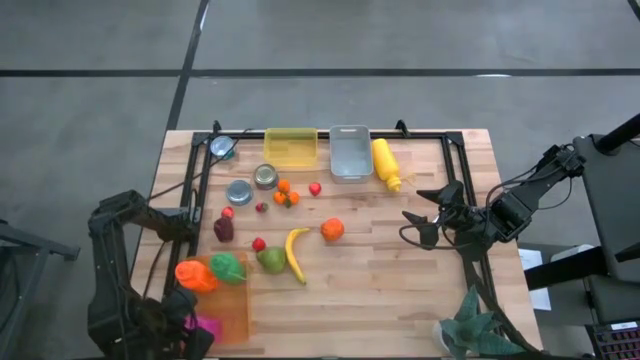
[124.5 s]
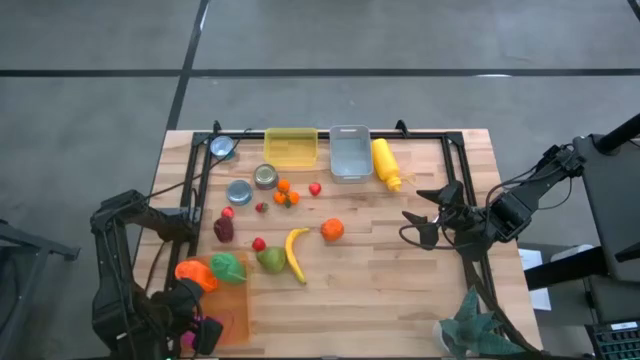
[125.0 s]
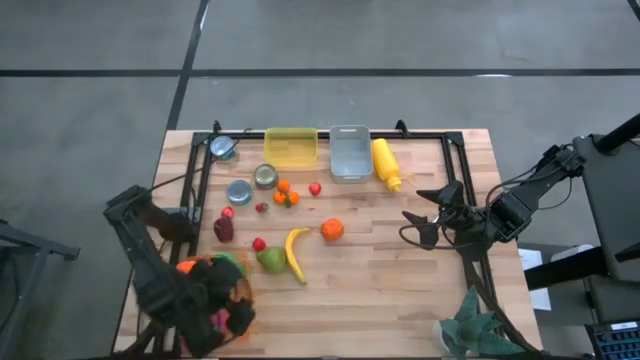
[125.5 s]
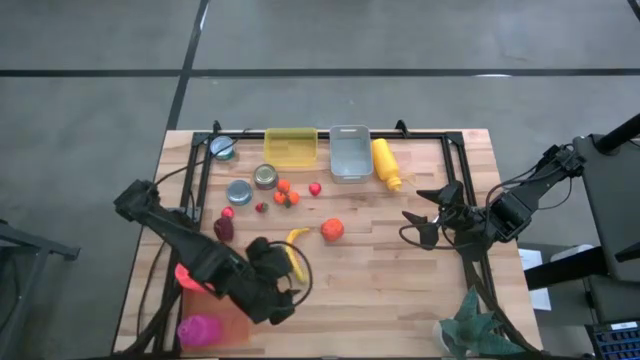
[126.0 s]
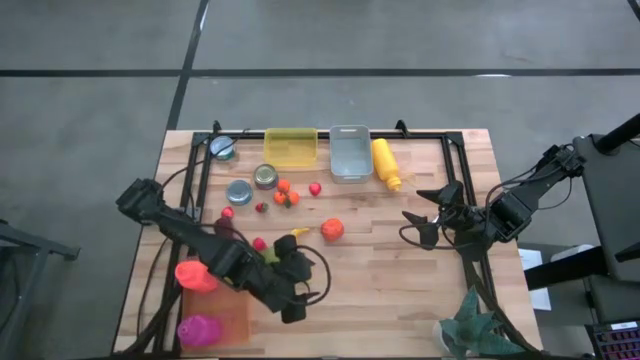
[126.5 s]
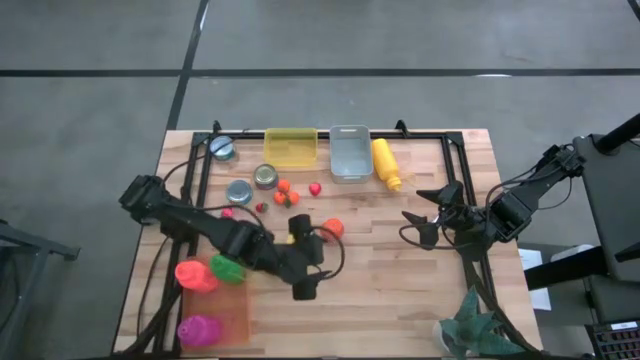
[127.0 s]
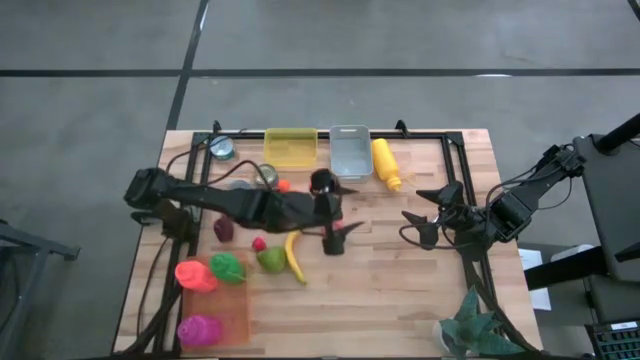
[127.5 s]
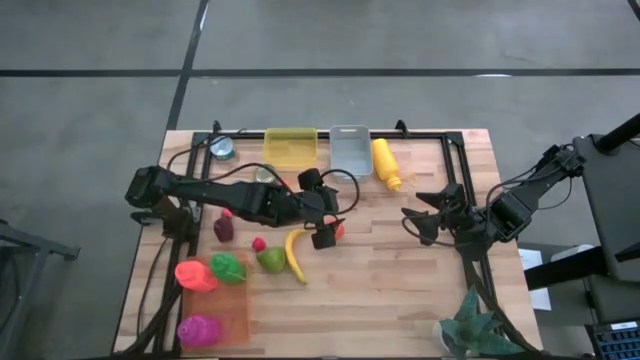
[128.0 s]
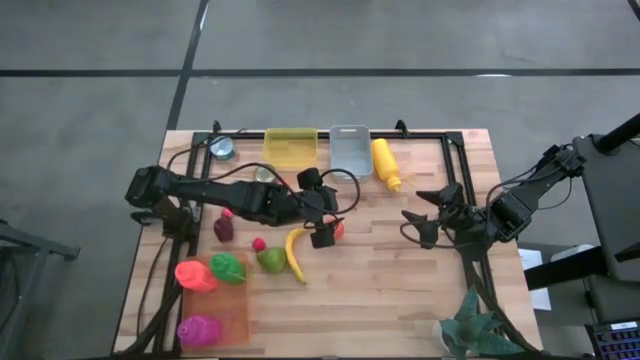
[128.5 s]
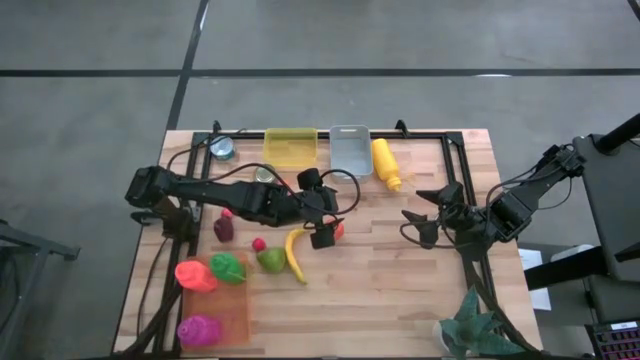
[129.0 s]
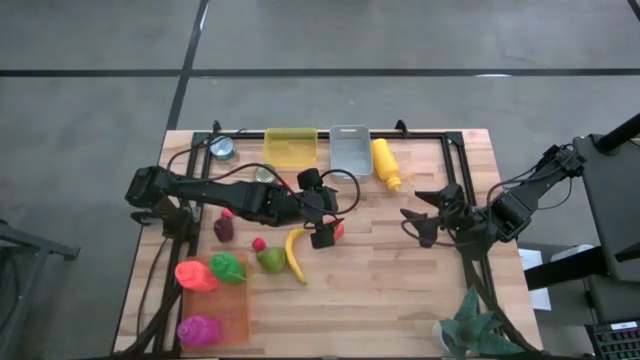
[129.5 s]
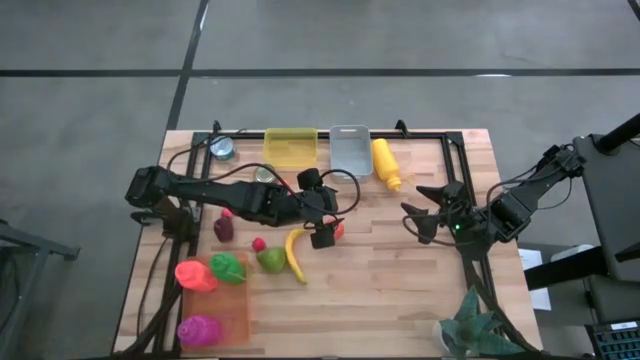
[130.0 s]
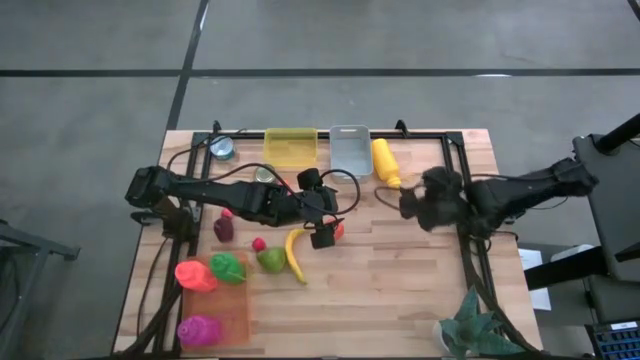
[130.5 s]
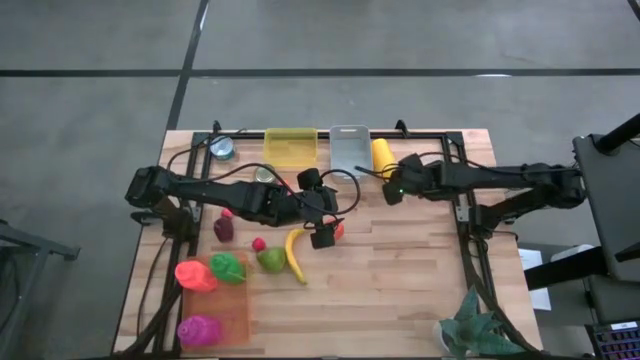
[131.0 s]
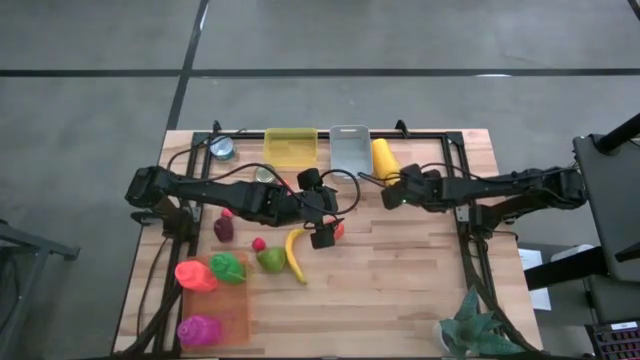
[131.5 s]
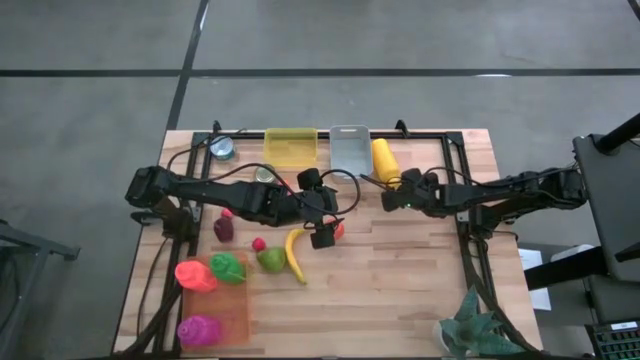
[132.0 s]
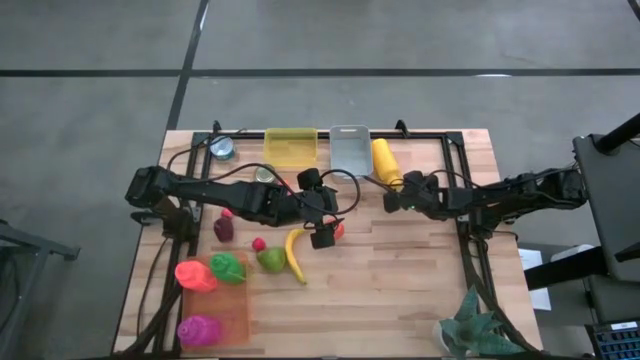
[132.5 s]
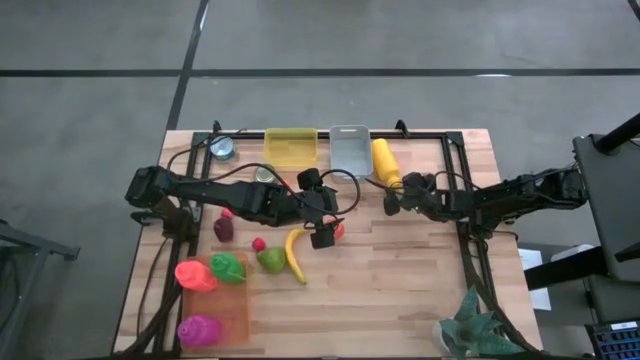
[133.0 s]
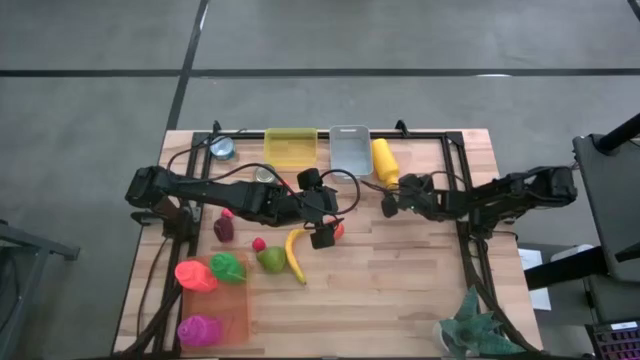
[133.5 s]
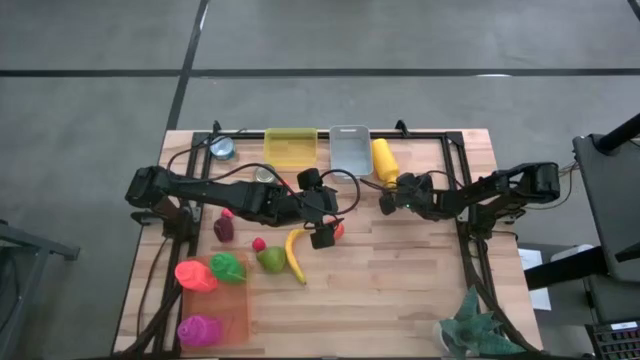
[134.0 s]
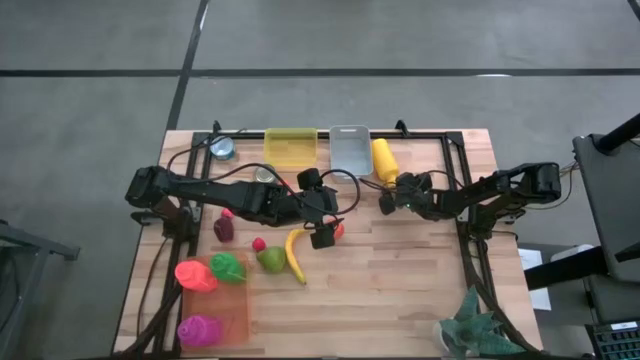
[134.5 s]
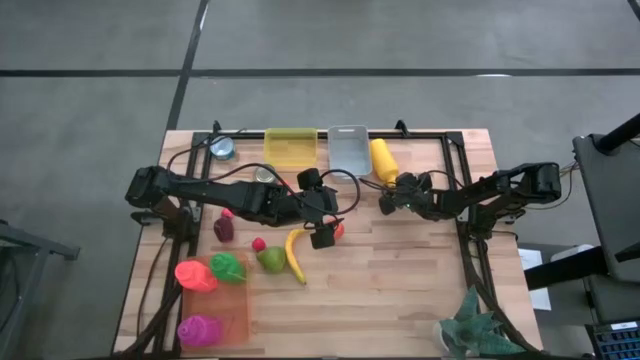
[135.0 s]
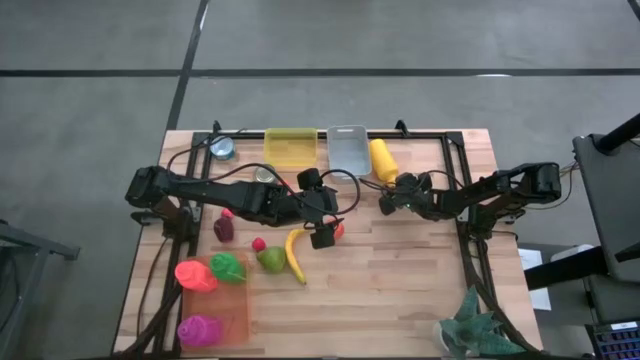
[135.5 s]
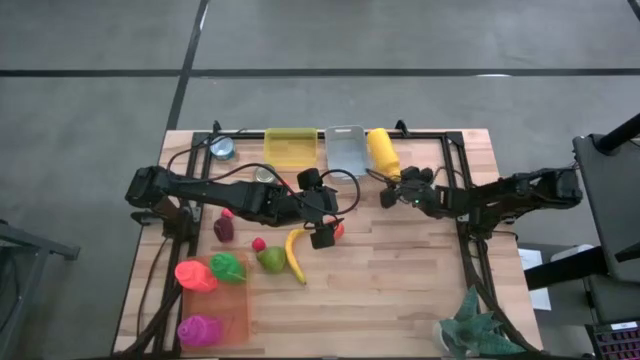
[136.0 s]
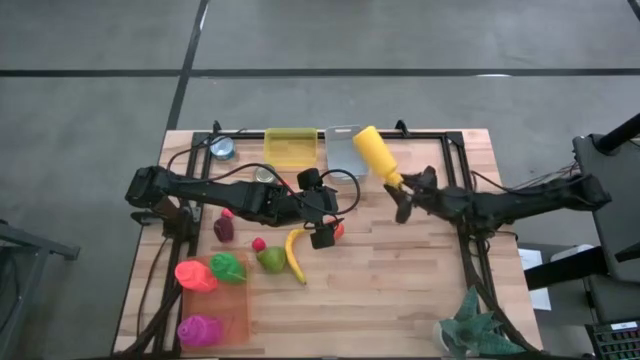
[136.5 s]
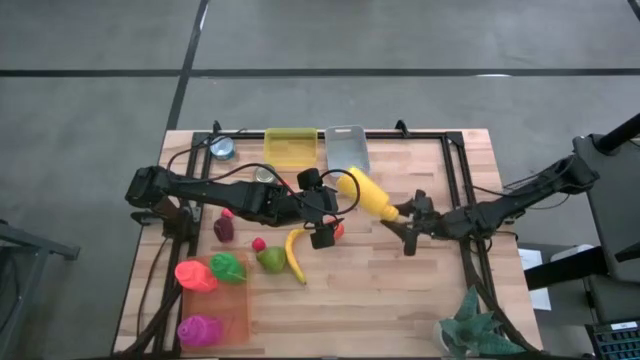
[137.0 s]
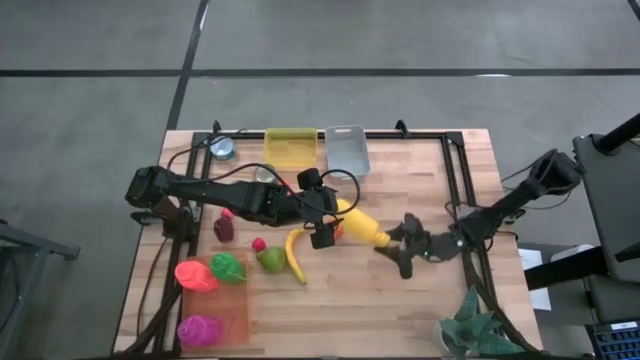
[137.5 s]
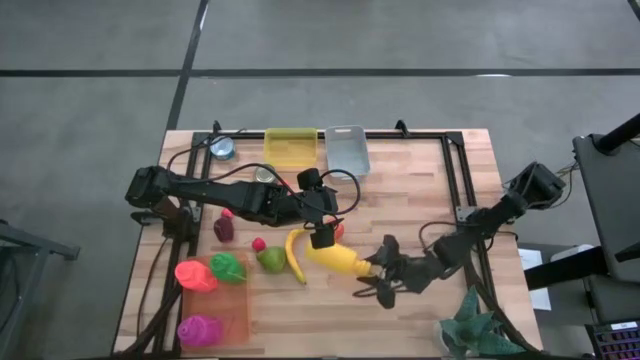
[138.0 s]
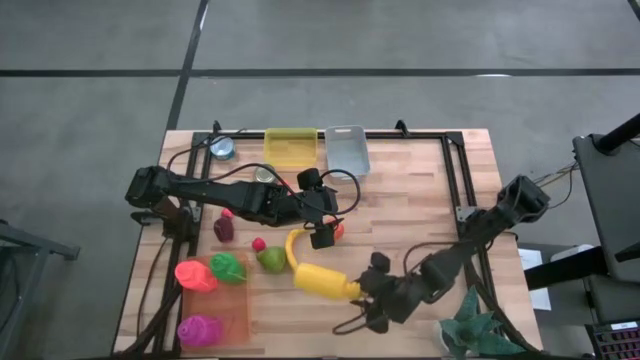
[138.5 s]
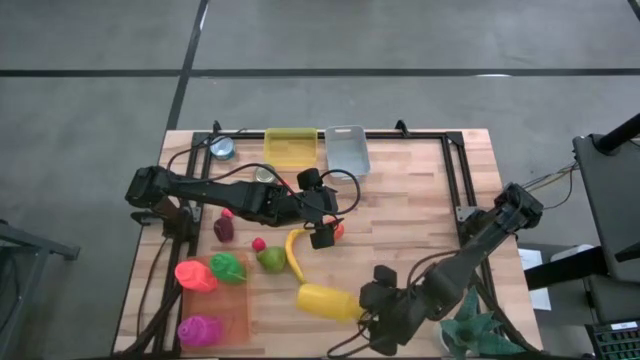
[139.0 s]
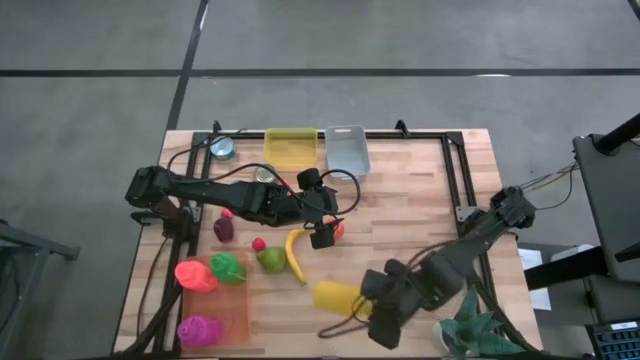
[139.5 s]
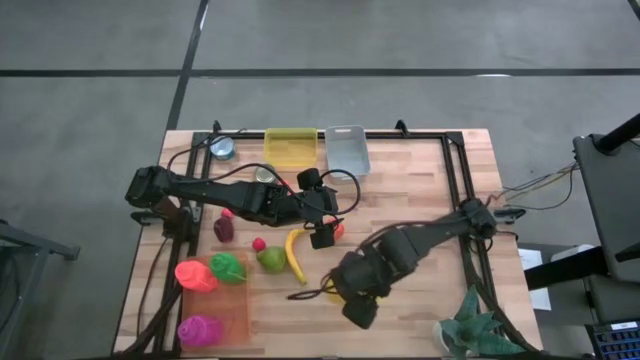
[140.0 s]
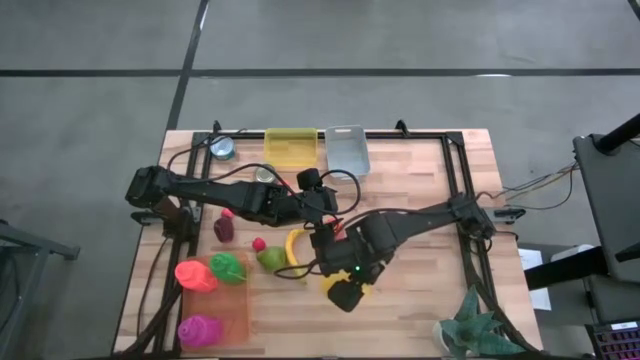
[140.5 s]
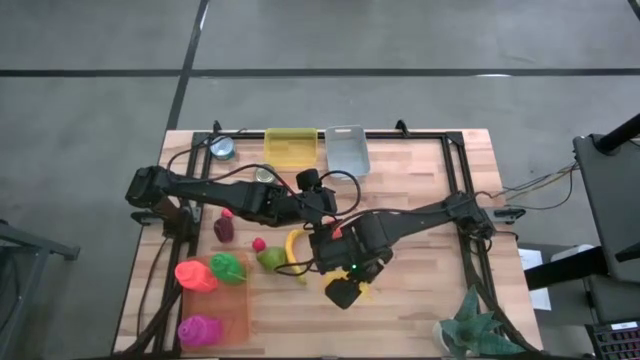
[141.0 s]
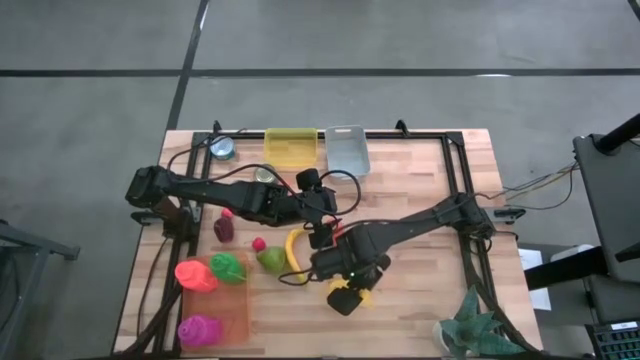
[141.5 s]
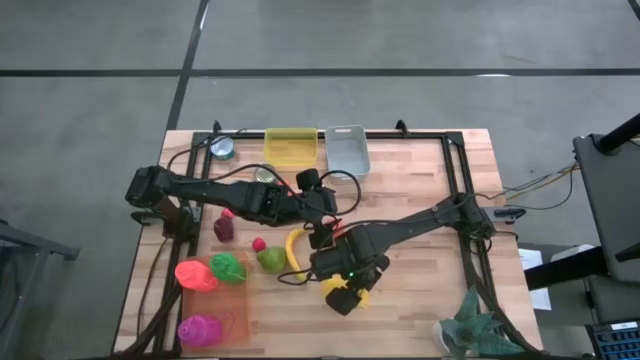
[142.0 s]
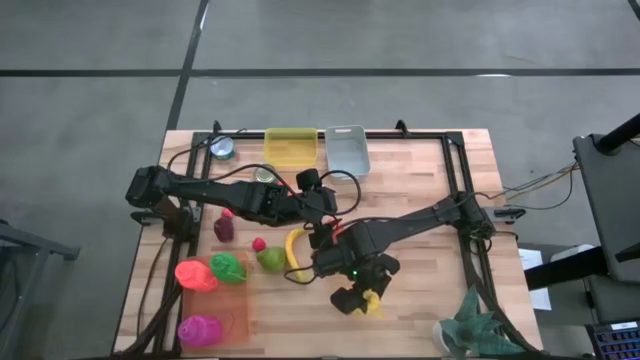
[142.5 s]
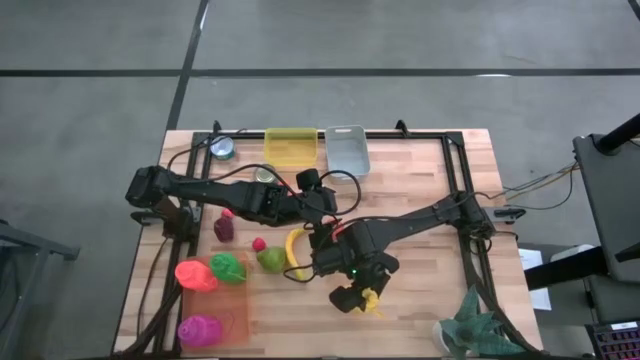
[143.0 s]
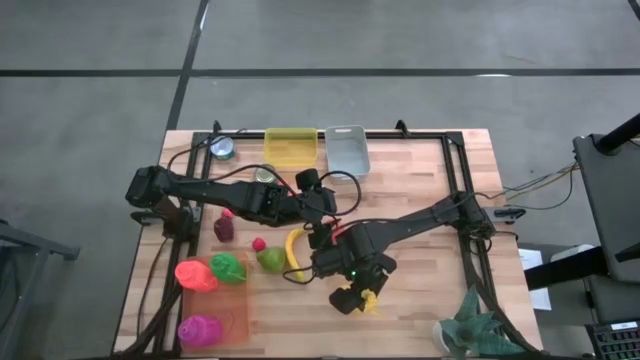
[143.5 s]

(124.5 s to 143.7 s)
Task: Pick & Place Food Item
Put the yellow tumbler into the orange bin

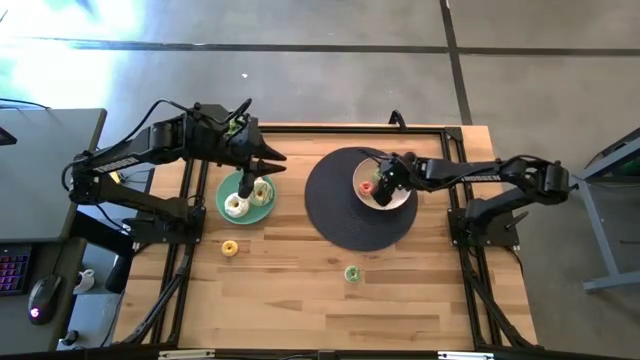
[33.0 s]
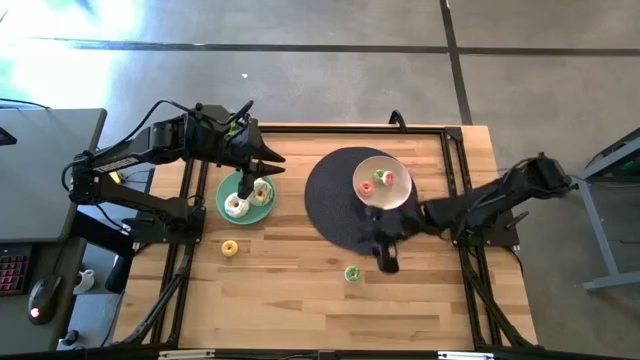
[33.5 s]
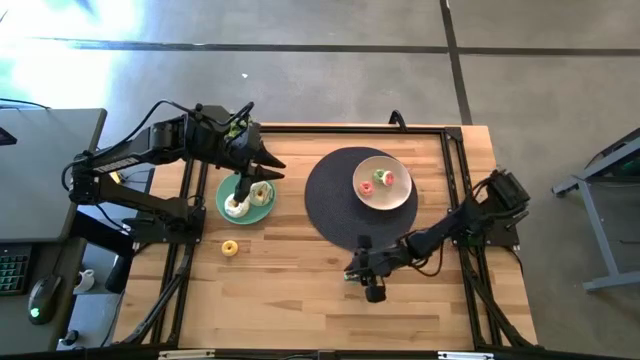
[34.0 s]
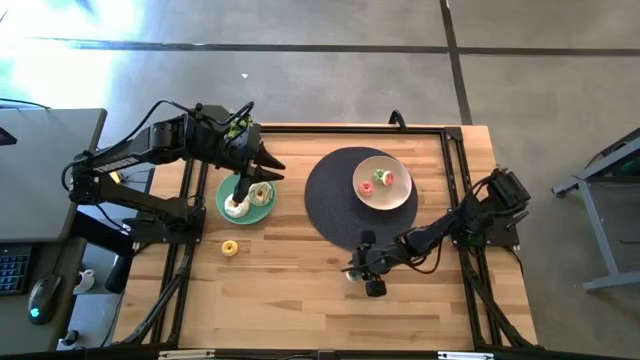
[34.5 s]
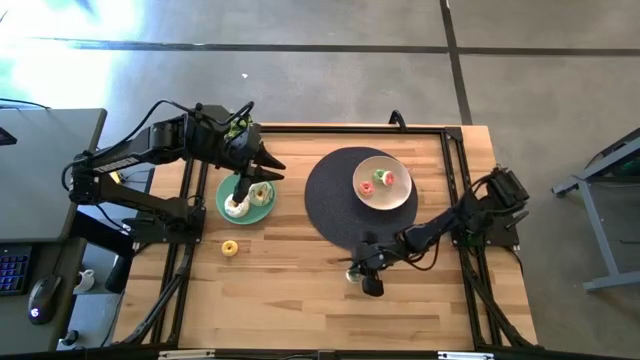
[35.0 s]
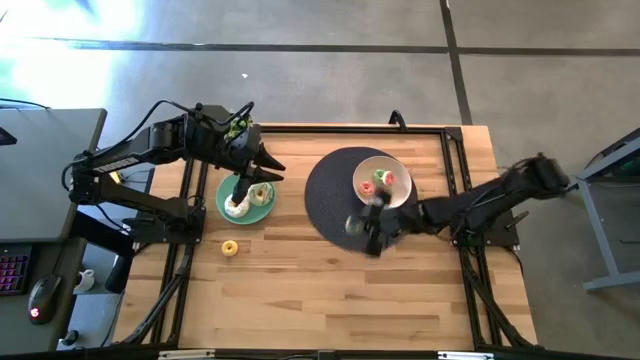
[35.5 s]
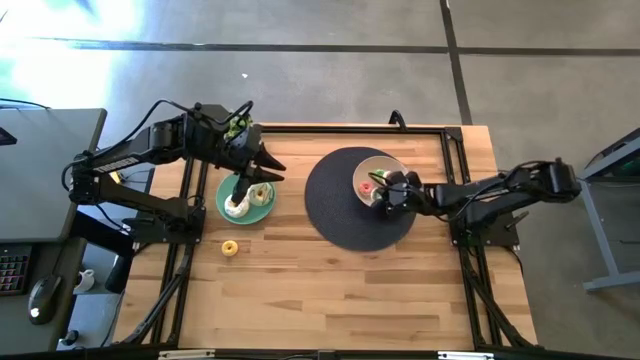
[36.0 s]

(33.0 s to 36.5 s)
Task: Pick & Place donuts
Put the green donut into the white plate
